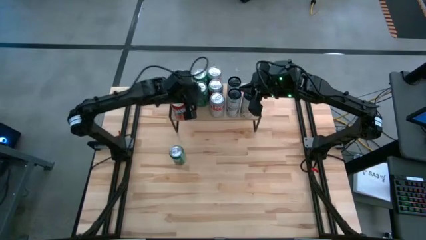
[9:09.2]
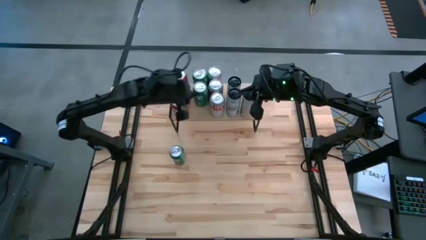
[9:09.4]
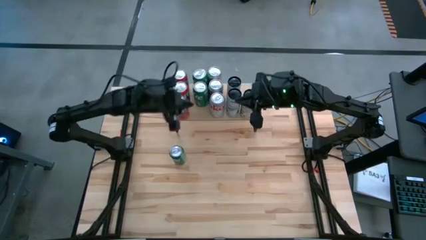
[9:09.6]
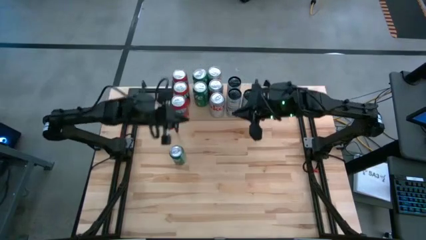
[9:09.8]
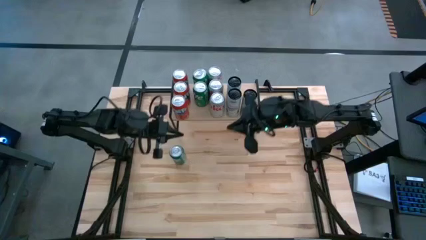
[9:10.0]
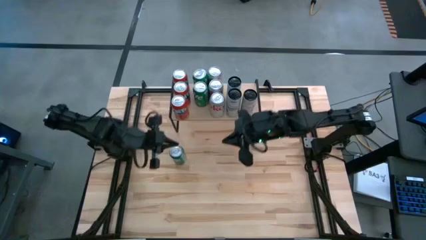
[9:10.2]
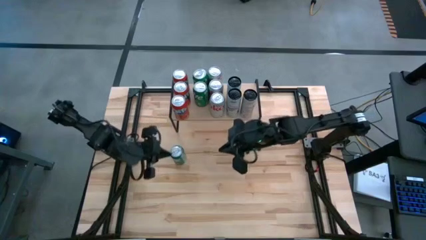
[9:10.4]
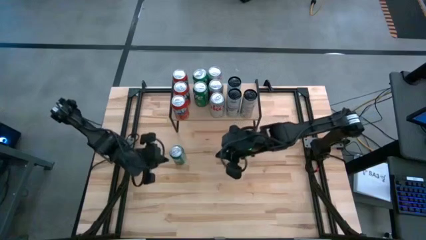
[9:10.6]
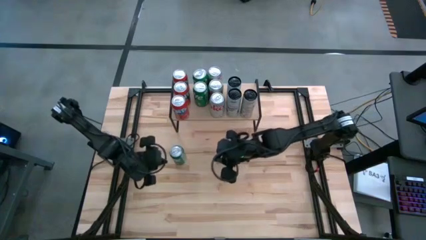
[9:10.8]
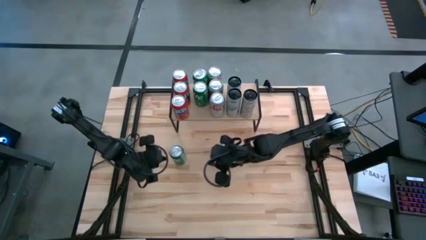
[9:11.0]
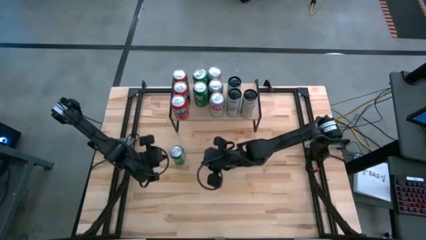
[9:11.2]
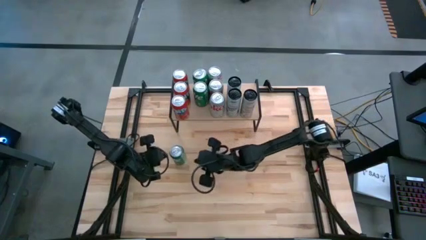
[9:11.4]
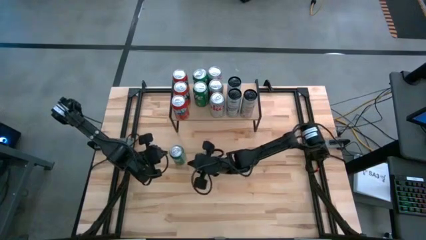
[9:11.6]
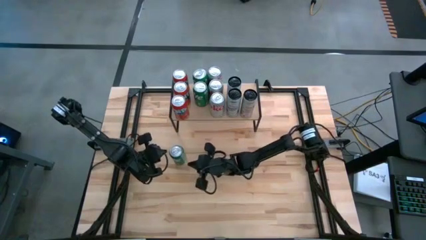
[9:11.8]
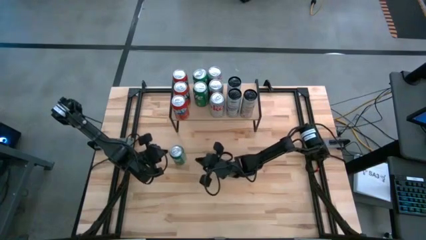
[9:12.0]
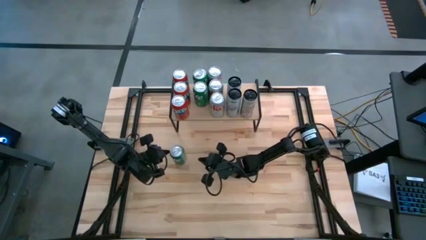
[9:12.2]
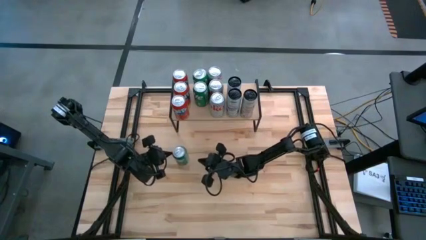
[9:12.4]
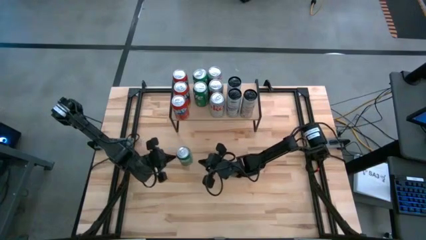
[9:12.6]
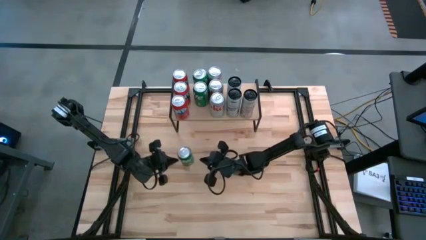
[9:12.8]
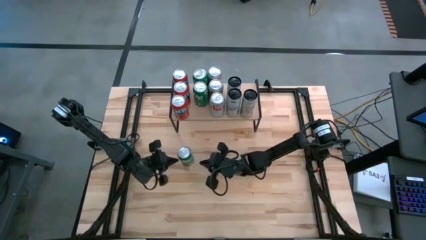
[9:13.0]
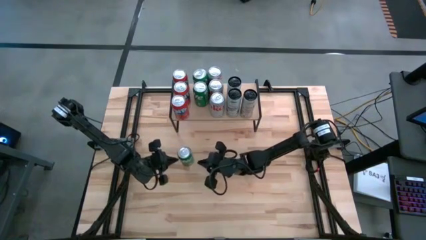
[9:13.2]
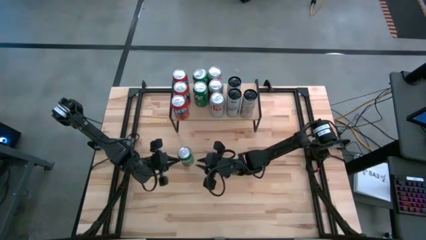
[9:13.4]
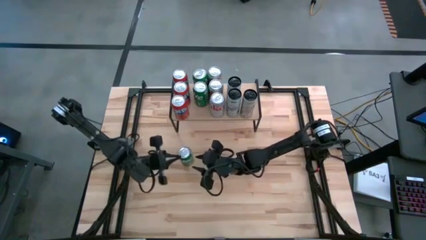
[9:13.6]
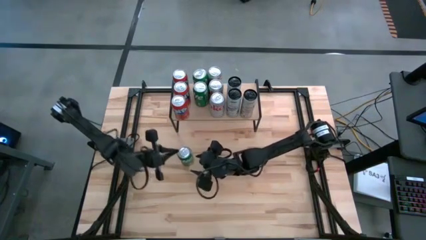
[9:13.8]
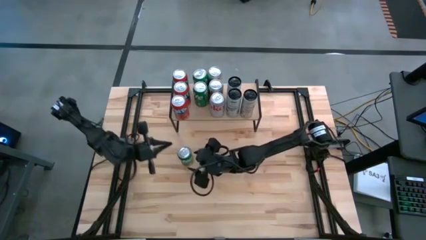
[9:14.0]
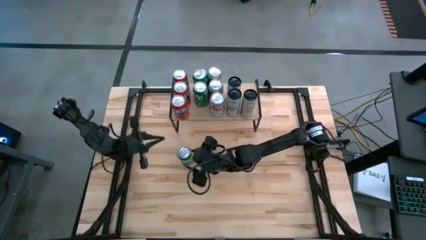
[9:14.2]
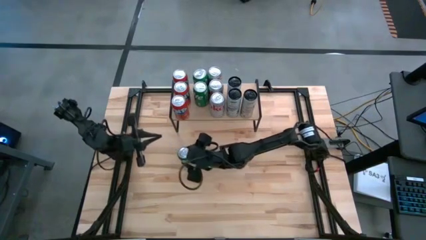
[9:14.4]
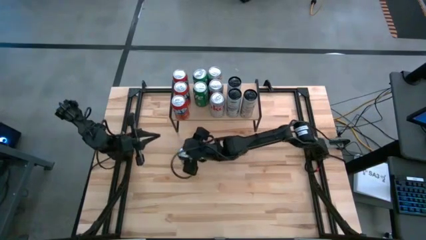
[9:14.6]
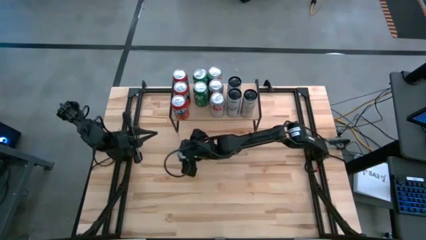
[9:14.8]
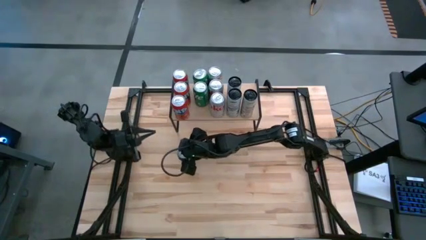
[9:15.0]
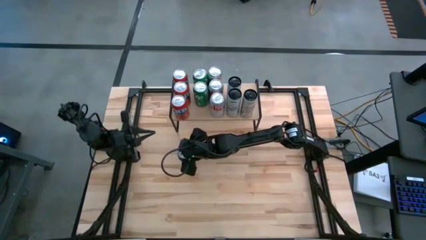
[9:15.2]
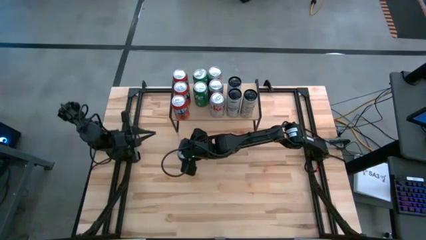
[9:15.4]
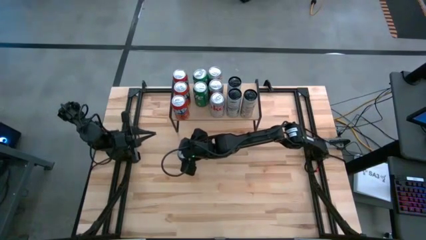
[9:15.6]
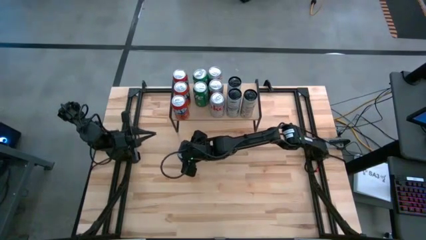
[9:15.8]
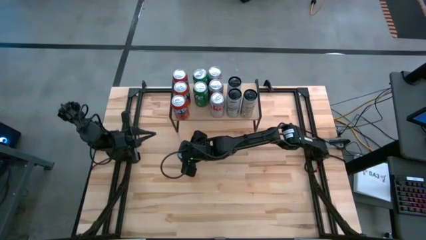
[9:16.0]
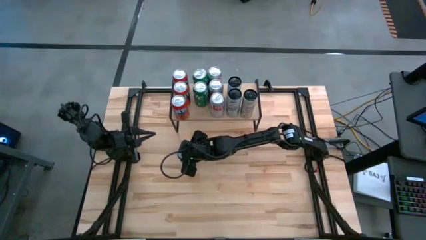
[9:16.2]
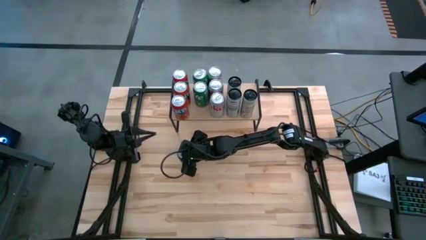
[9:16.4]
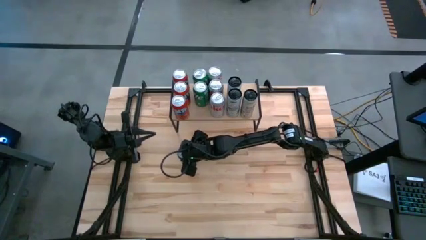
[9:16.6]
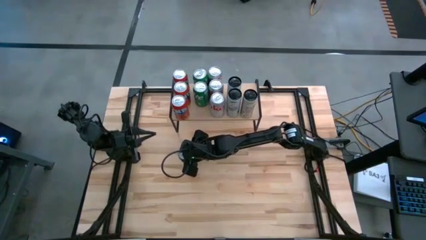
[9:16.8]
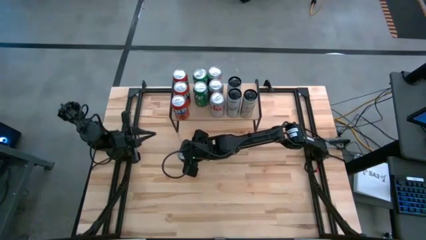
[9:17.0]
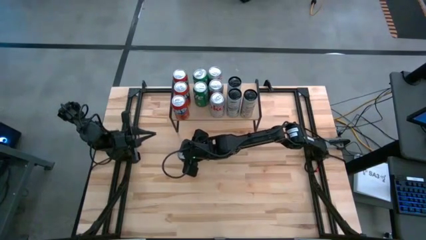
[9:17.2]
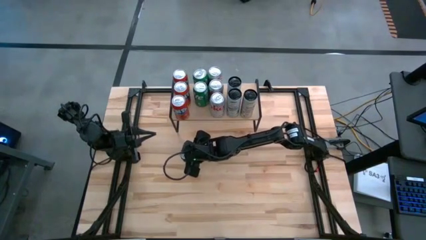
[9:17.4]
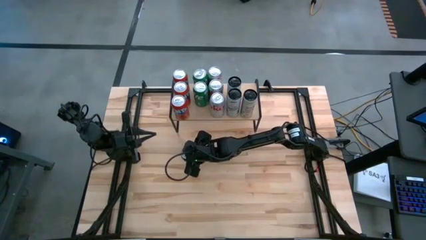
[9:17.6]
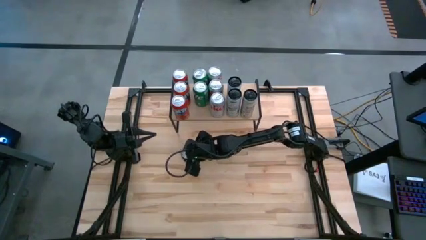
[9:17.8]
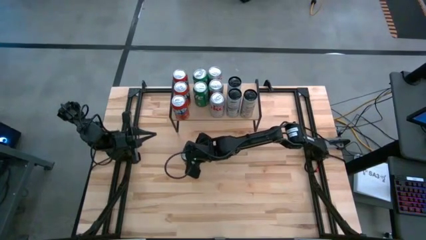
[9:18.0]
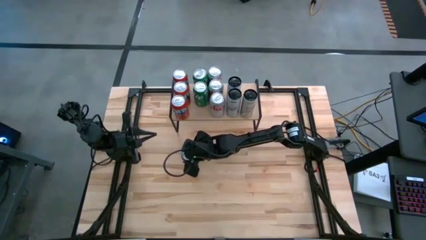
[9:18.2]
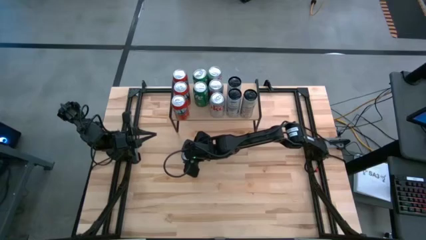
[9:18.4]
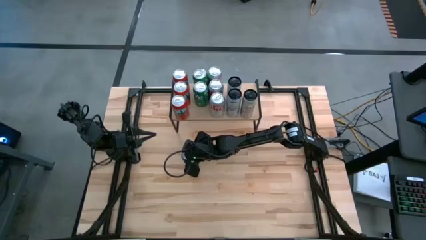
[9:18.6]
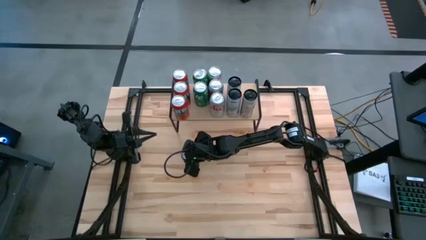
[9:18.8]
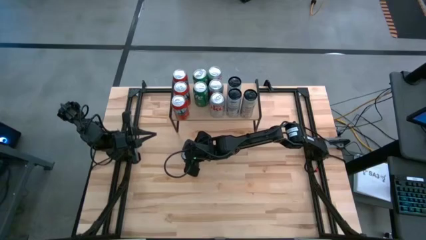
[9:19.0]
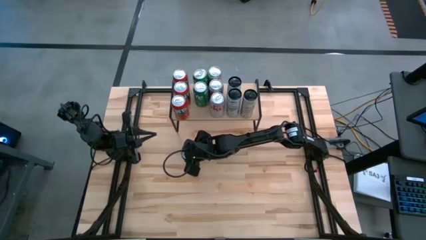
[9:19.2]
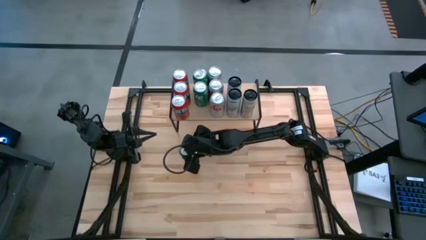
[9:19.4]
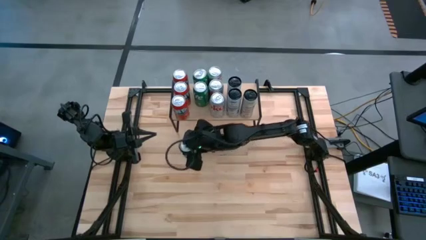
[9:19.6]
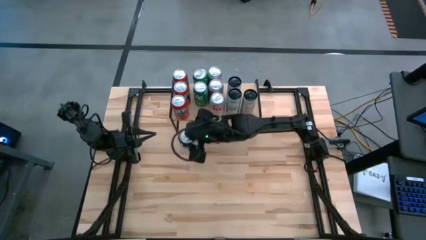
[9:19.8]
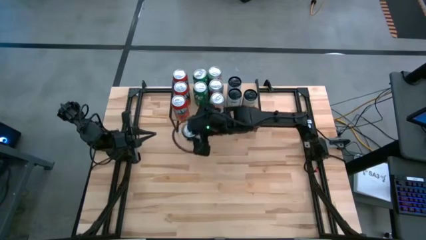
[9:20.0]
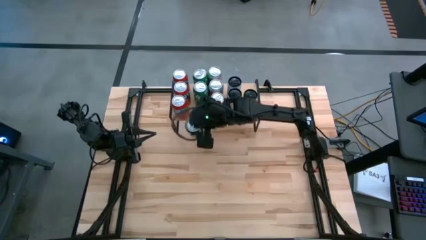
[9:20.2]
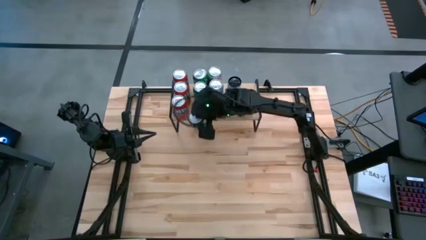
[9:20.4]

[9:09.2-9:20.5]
Task: Place canned beverage on shelf
Put the green soda can on the shelf aligned with the other green soda can

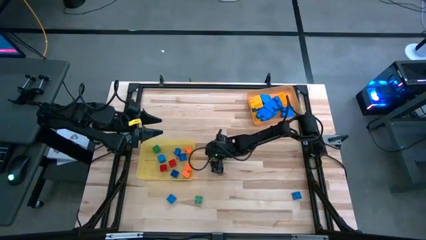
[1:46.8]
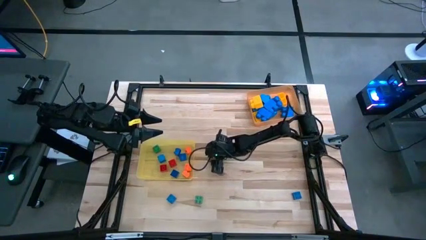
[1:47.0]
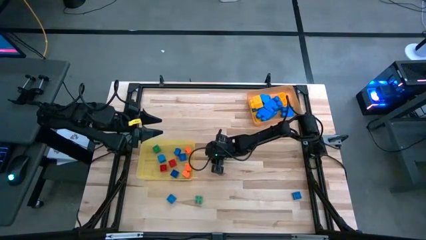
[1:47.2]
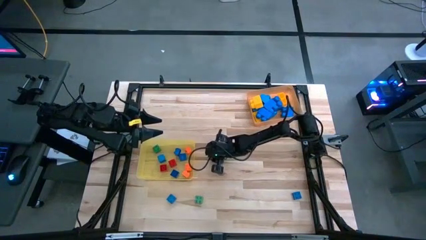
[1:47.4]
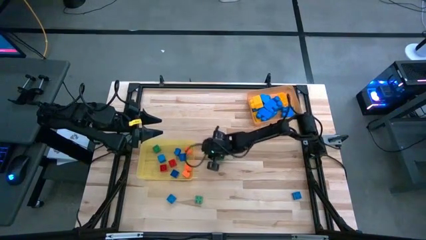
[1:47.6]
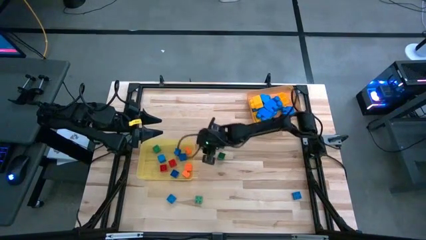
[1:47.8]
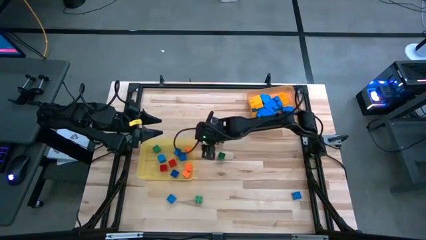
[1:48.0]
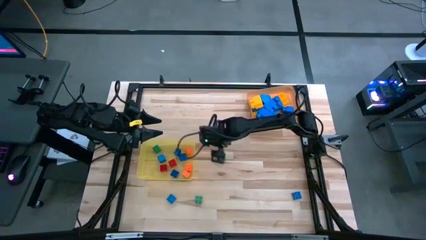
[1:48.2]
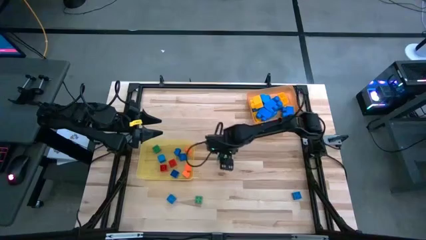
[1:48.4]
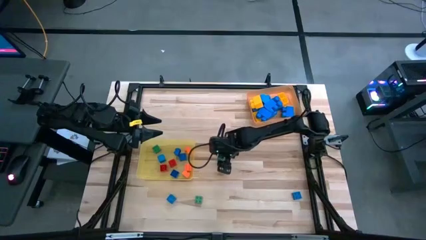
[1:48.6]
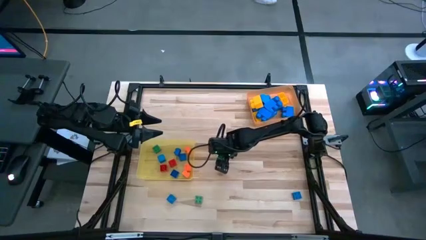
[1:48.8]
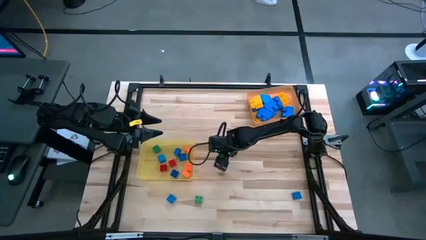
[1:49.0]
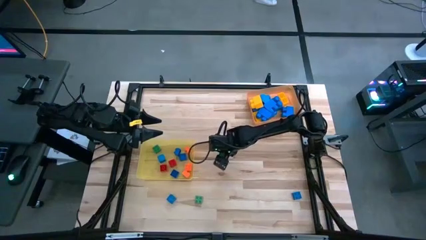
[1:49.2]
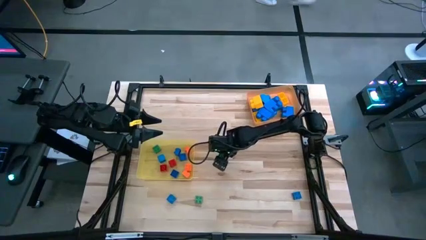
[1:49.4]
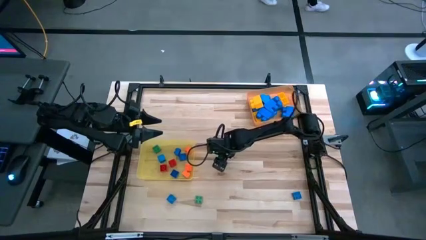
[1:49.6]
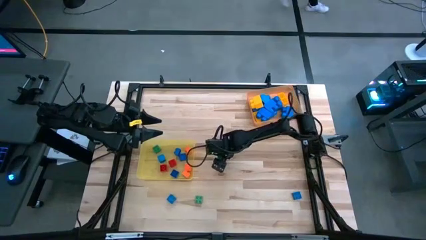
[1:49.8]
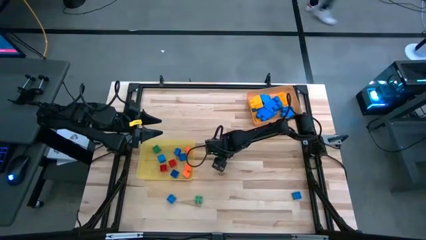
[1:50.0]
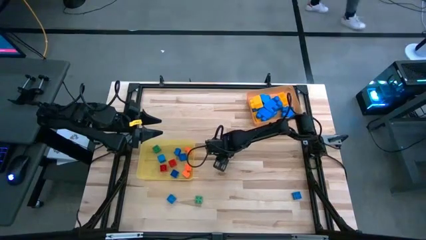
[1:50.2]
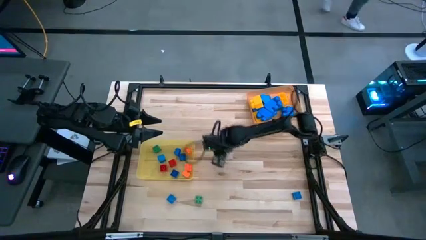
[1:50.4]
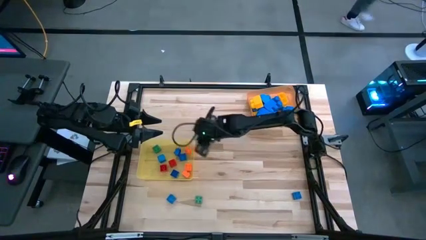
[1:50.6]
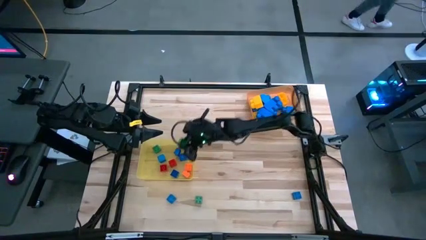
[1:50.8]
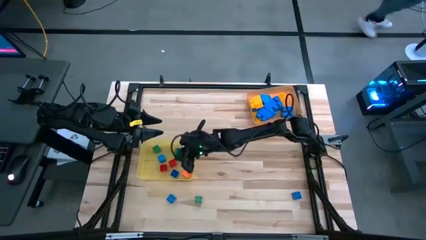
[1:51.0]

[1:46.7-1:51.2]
Task: Sort blocks by size
Put the small green 4 stud game piece into the yellow bin

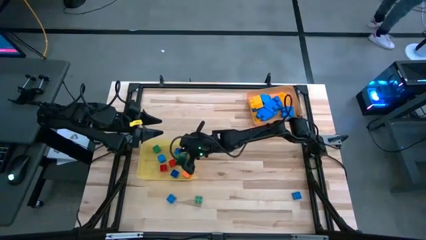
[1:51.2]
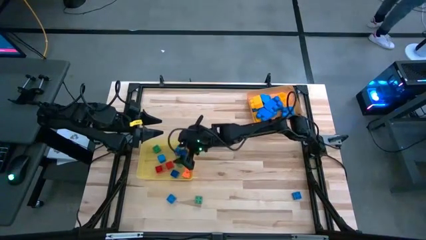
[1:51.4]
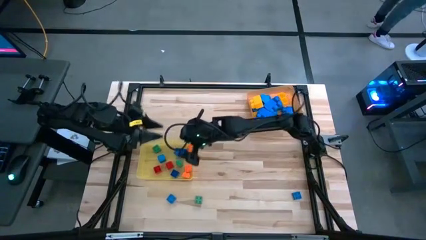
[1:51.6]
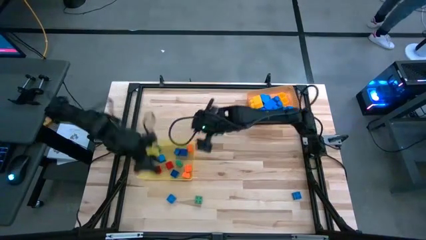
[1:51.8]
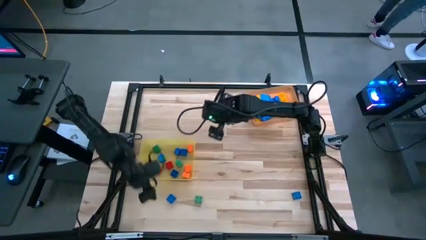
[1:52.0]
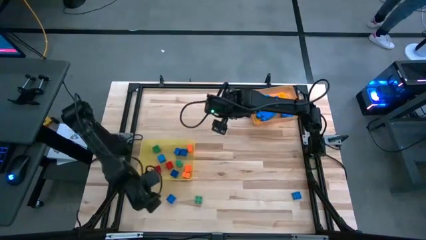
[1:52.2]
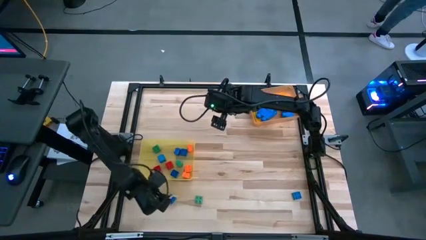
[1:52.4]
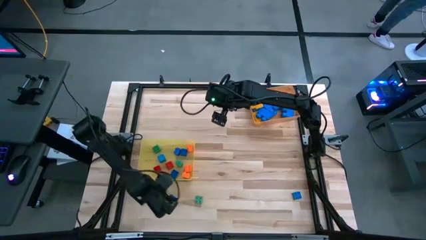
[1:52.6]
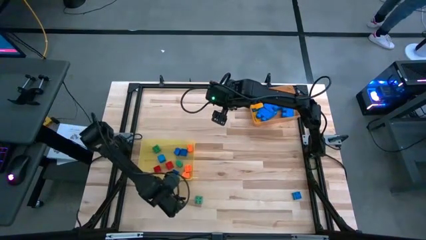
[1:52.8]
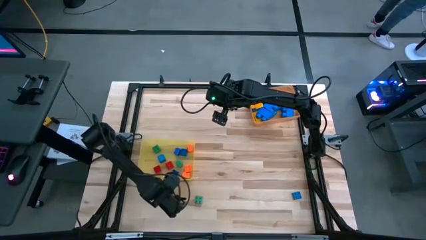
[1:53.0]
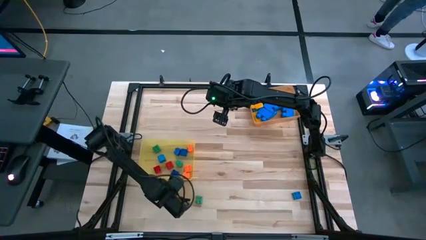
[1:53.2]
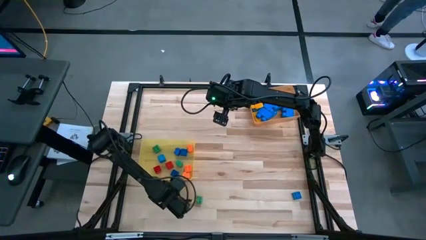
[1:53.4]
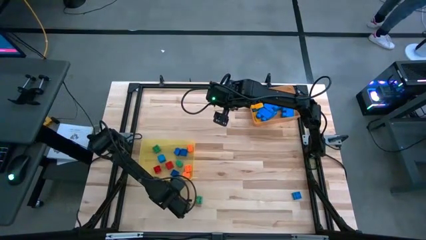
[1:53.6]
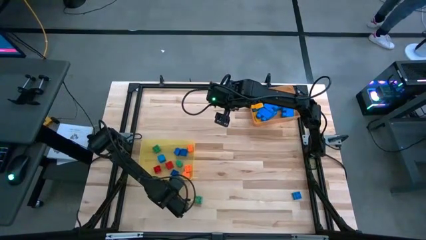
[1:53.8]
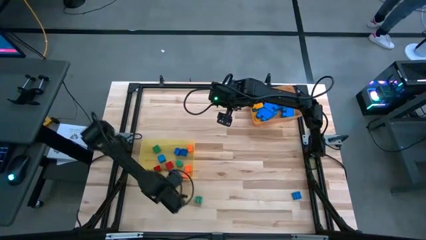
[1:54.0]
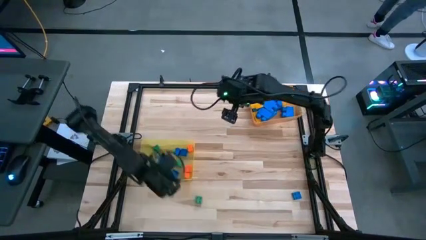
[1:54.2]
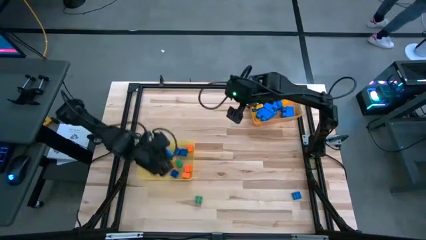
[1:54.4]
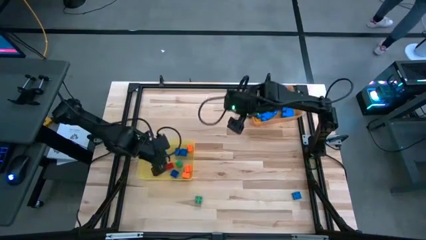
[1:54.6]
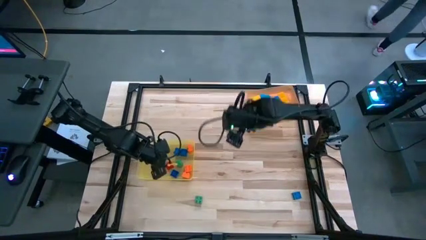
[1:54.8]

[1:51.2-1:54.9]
Put the small 4 stud blue game piece into the yellow bin
